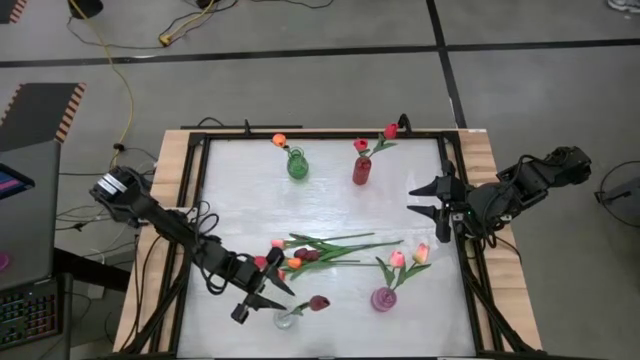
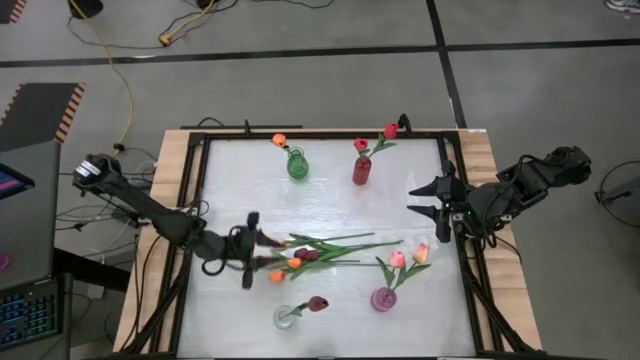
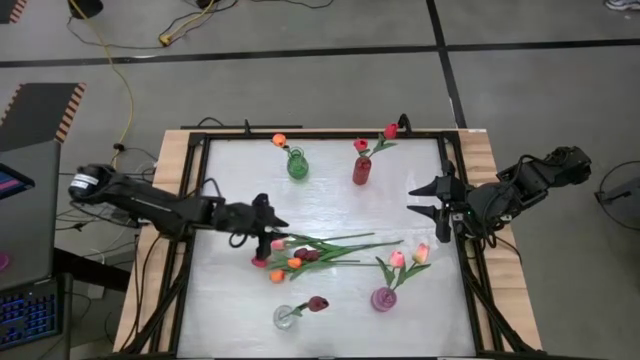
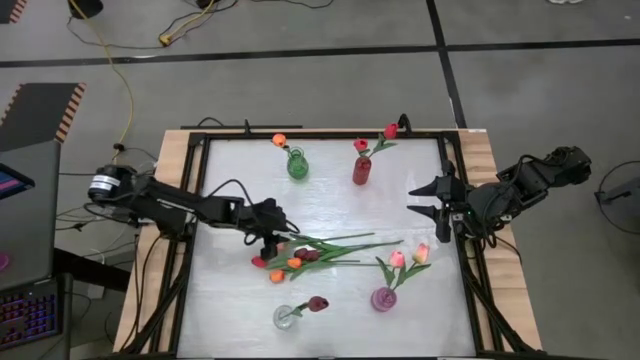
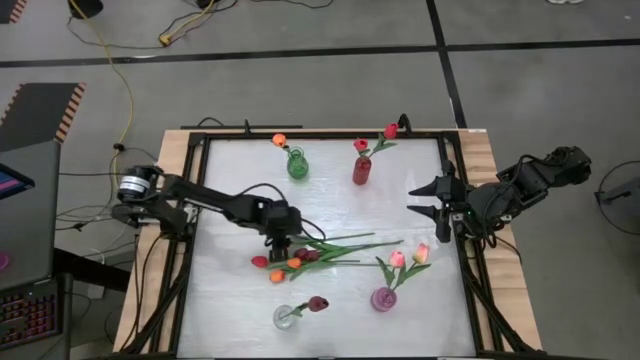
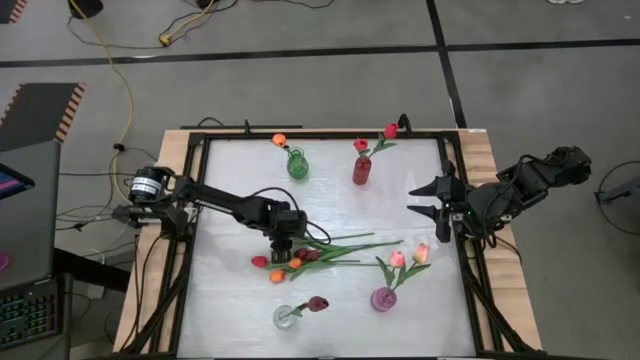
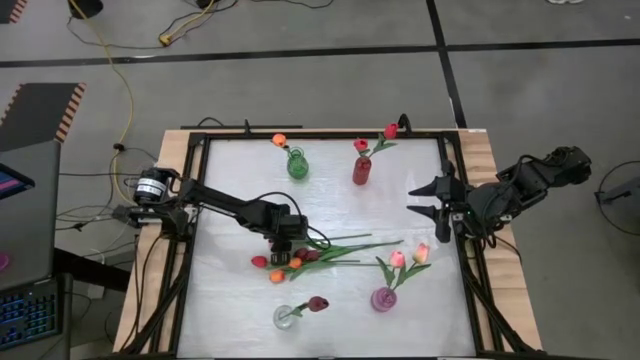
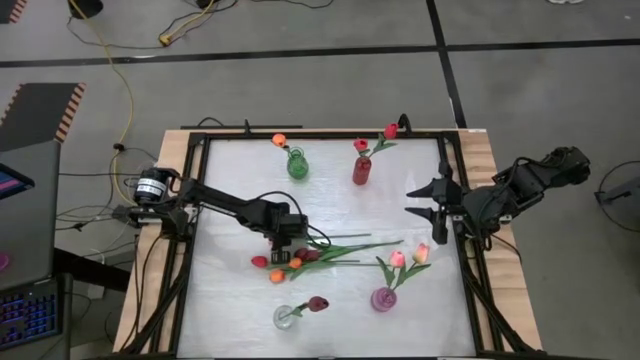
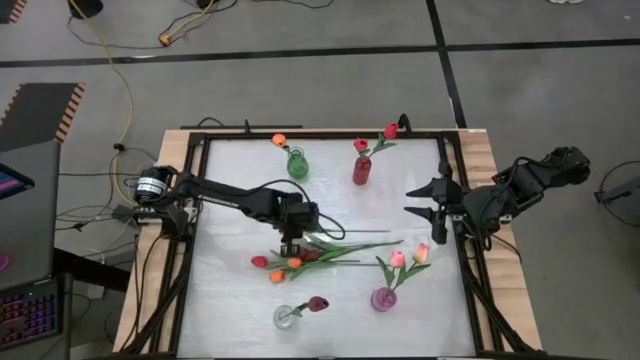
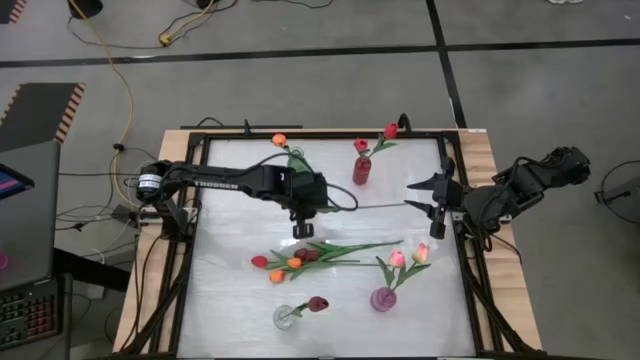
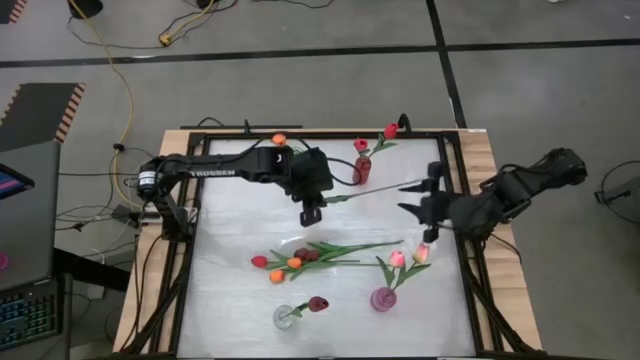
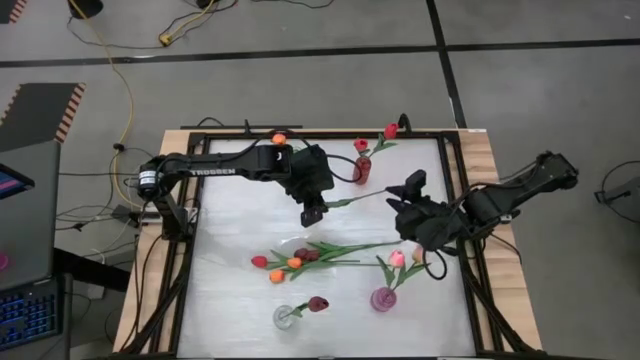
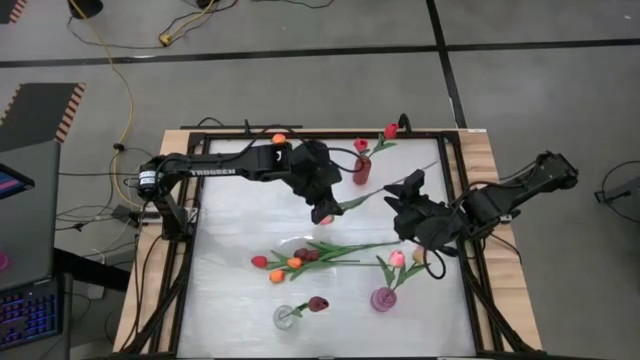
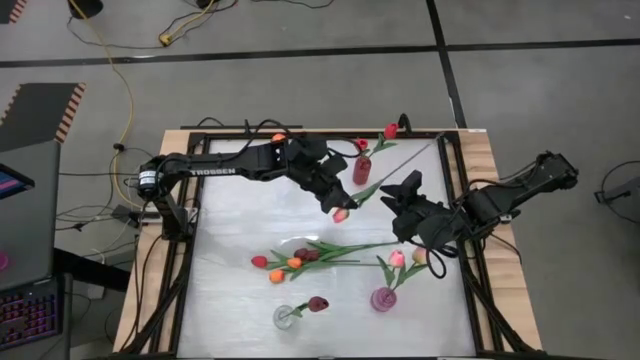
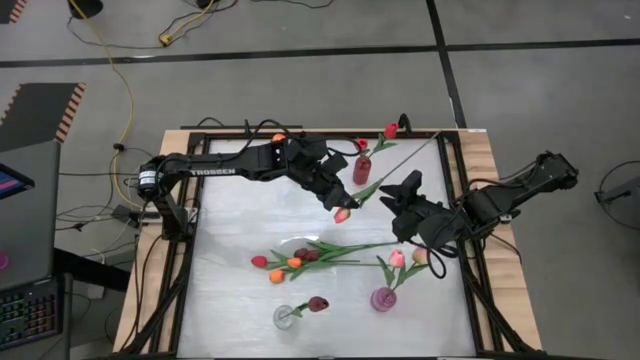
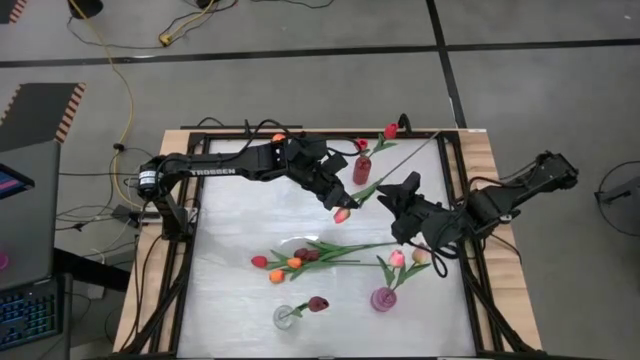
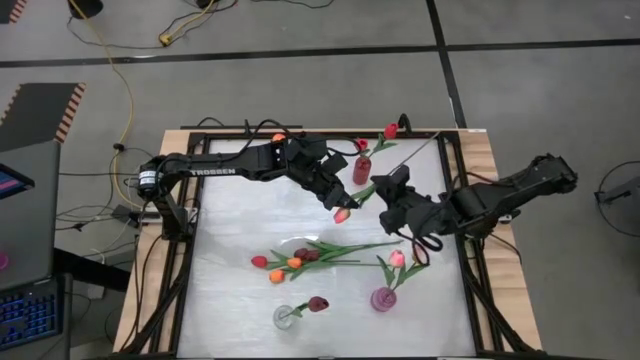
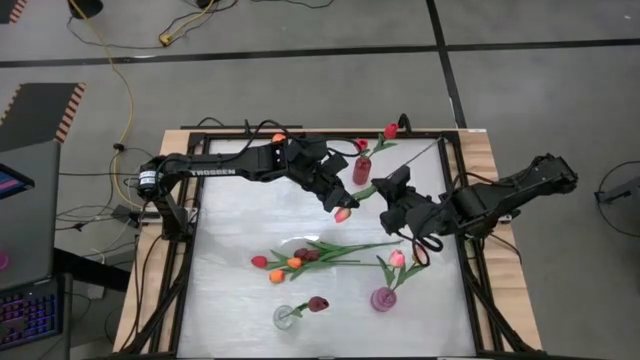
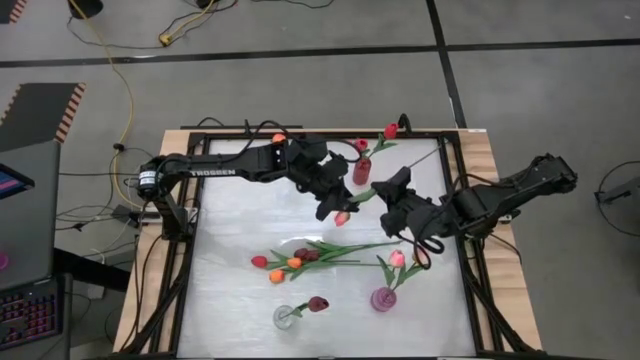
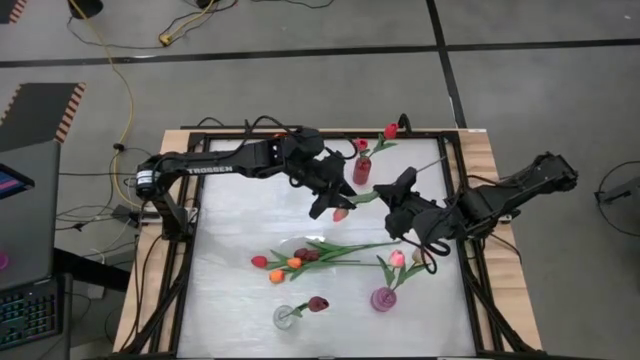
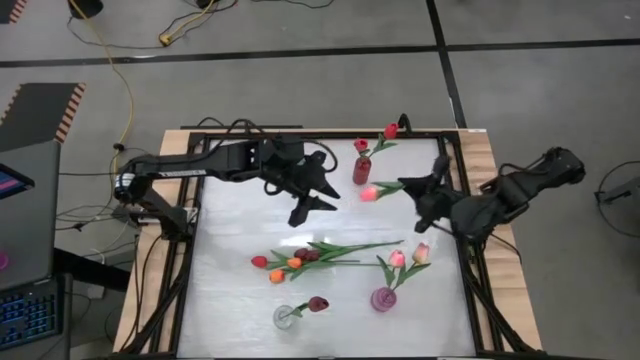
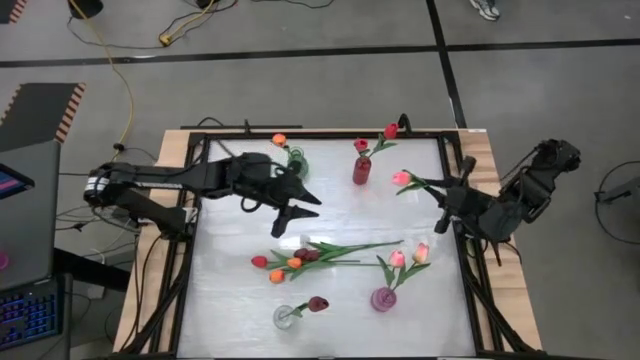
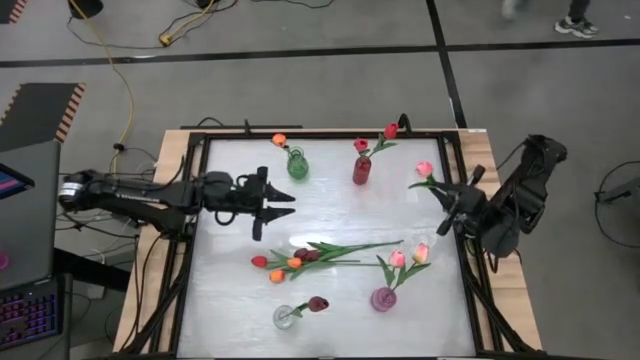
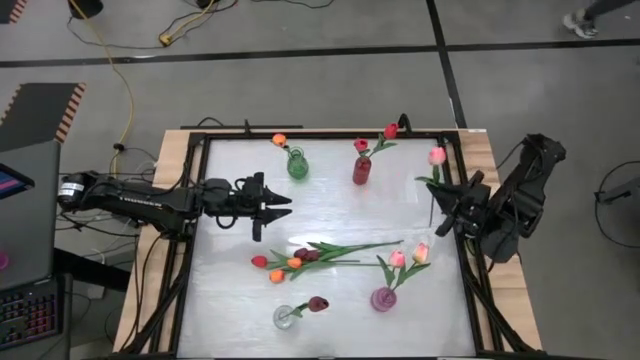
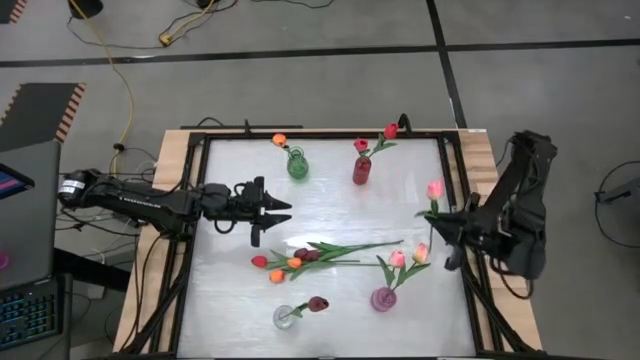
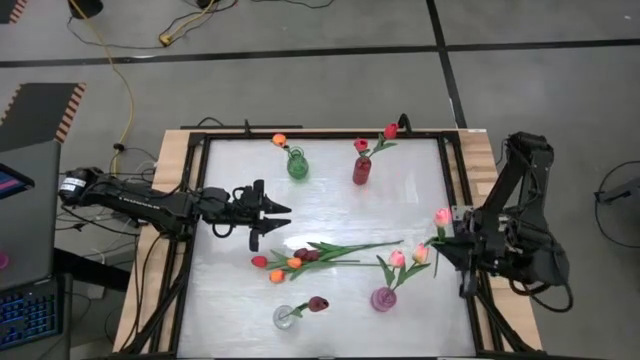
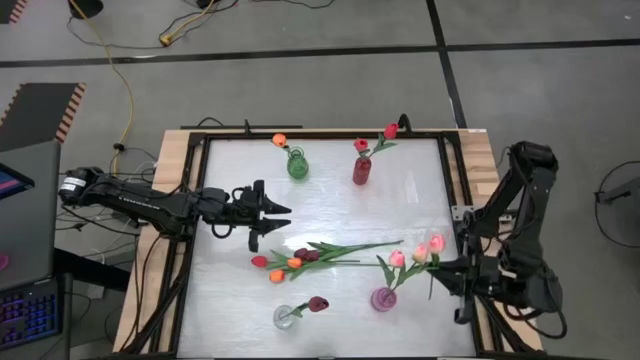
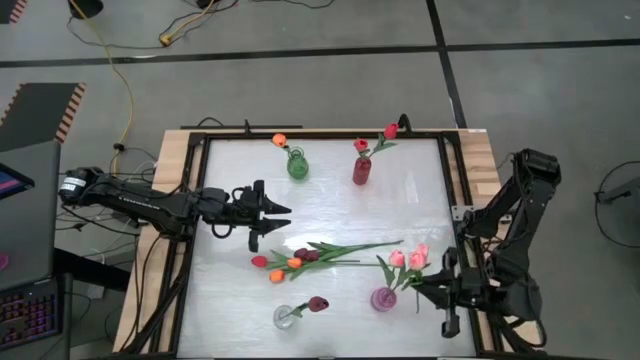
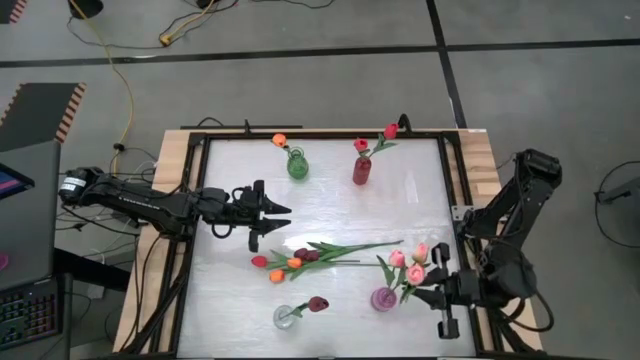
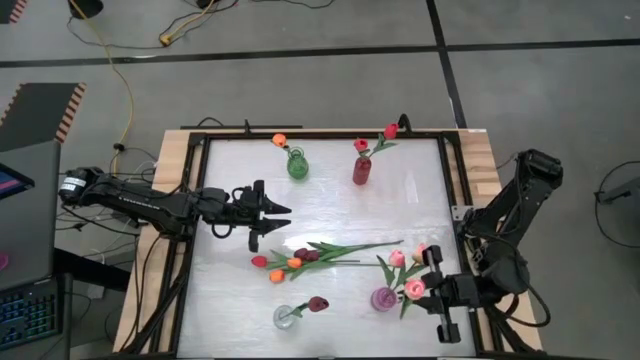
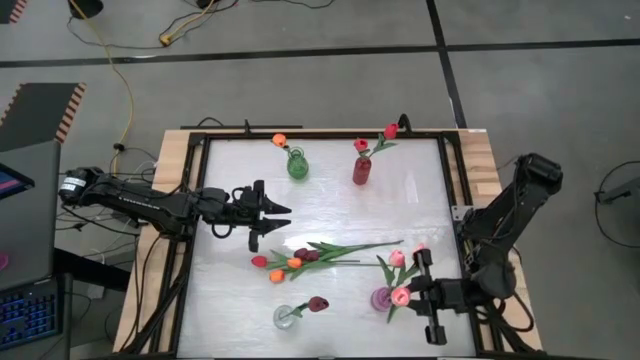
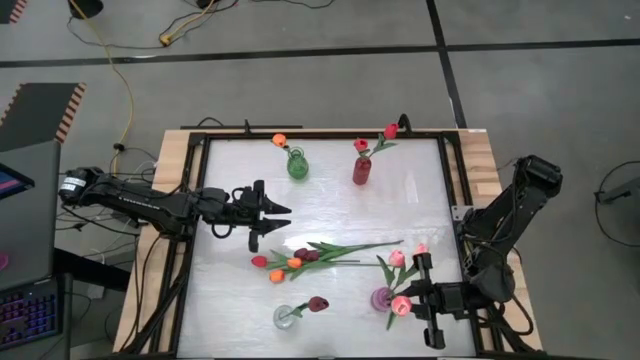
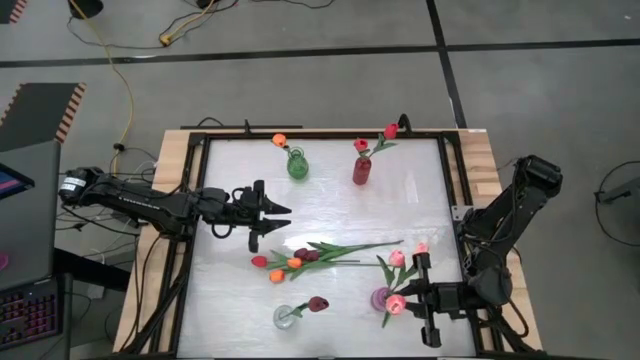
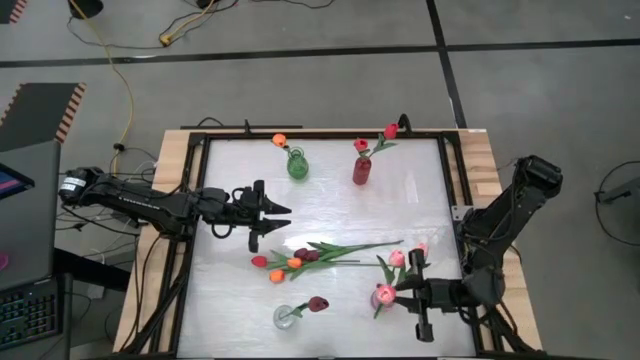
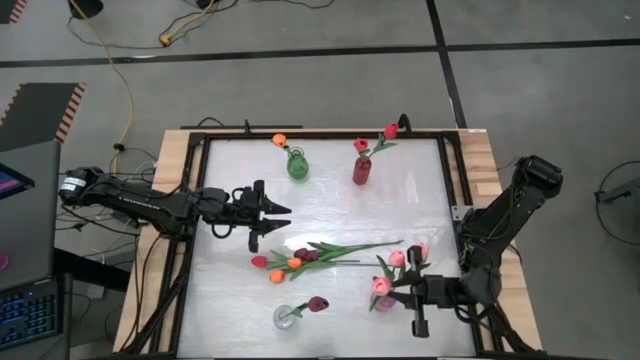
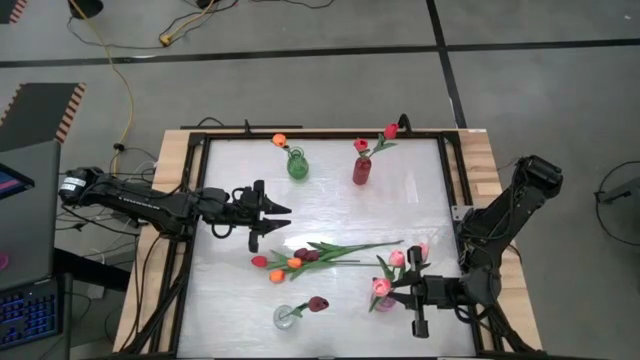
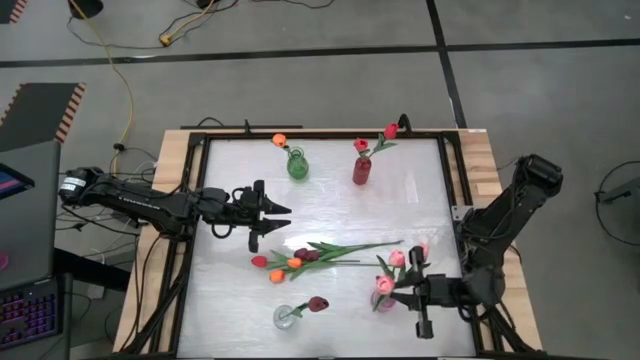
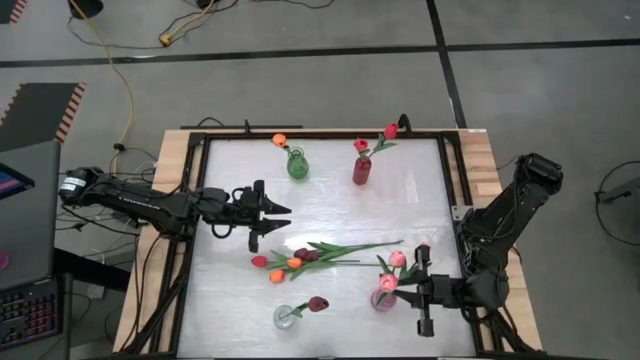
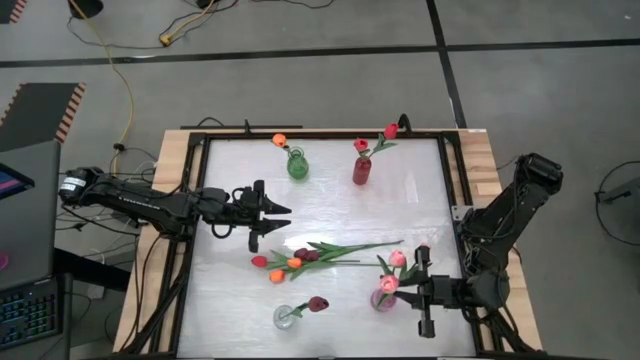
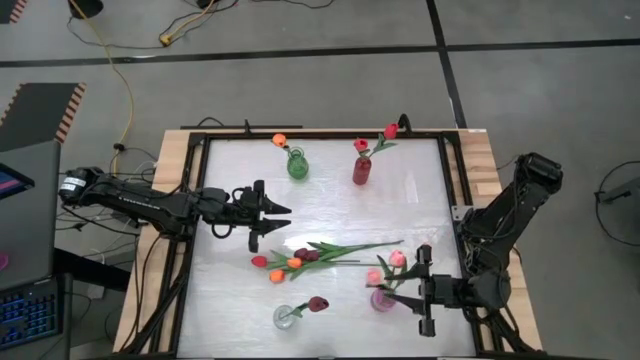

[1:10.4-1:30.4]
Task: Sort flowers into vase by color
Put the pink flower into the purple vase

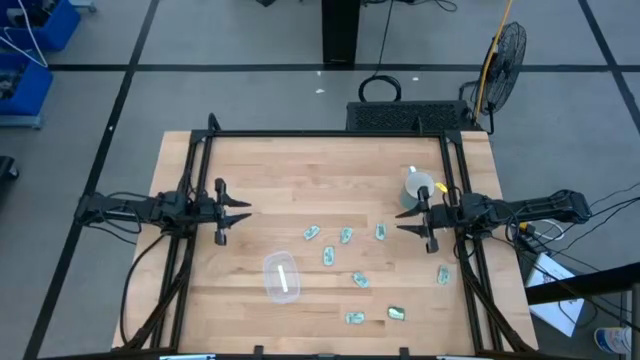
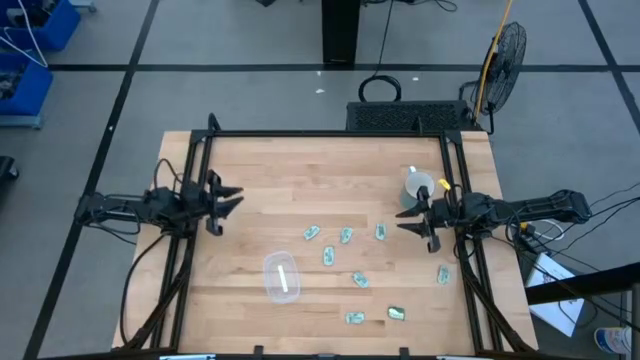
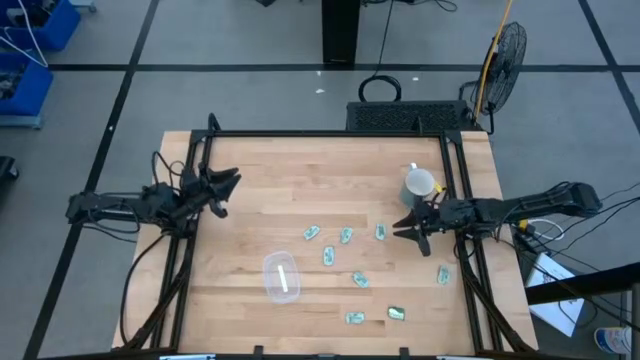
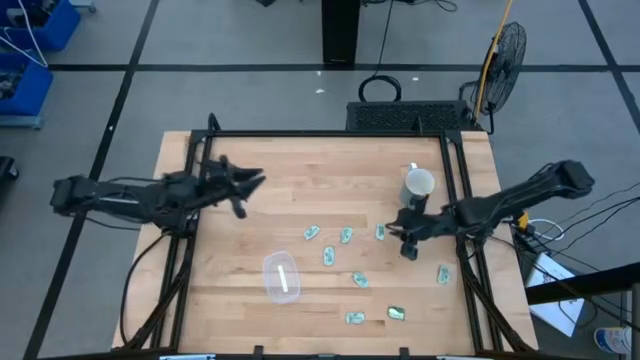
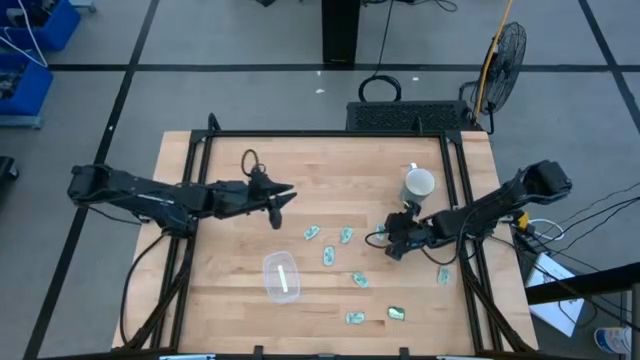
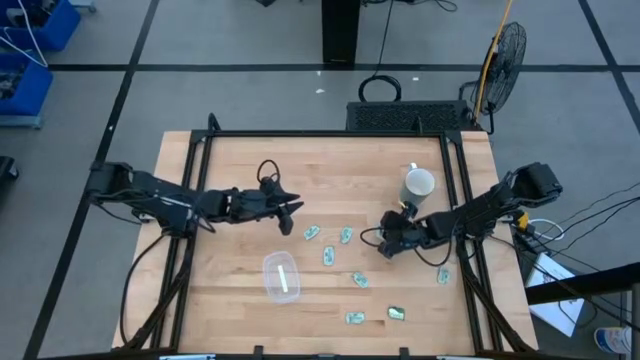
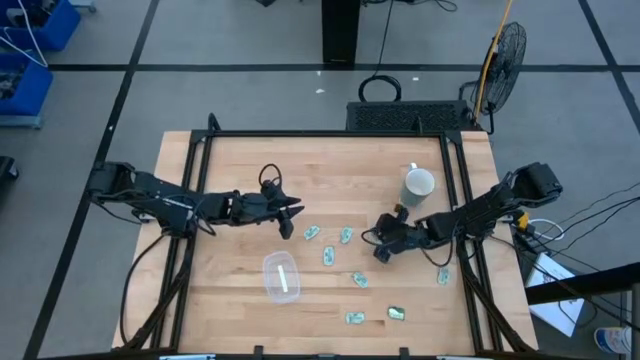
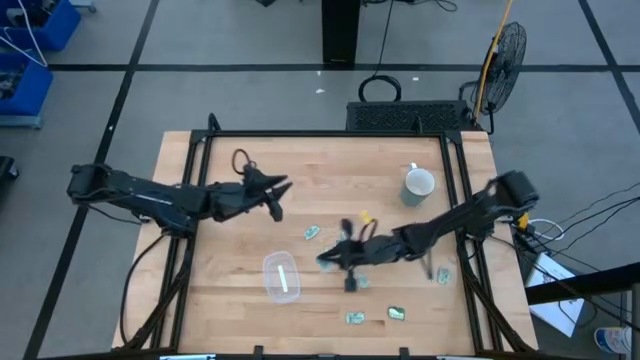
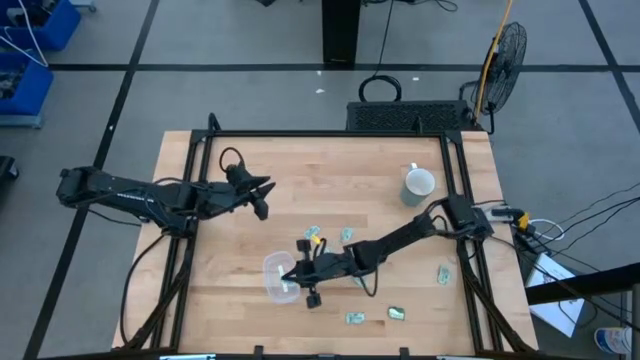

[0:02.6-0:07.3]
Task: Pick and place Stevia / Truvia into bins
Put the stevia packet into the transparent container
